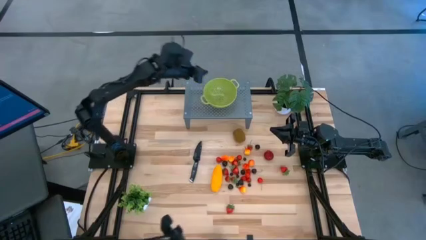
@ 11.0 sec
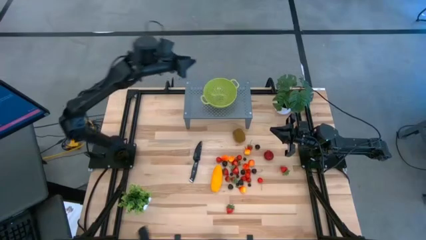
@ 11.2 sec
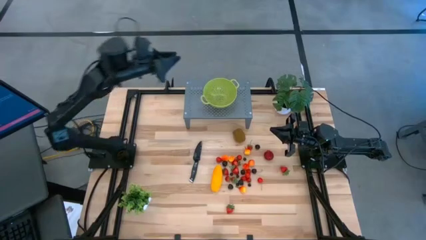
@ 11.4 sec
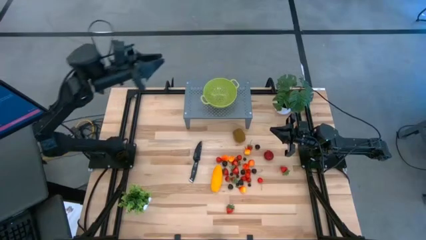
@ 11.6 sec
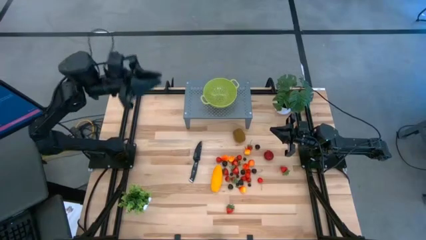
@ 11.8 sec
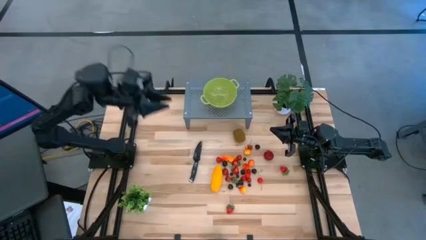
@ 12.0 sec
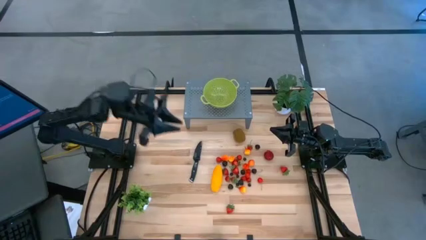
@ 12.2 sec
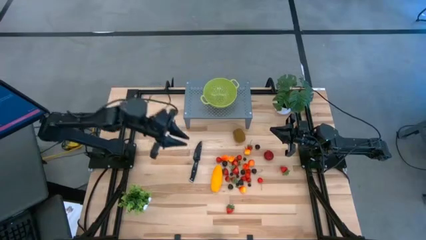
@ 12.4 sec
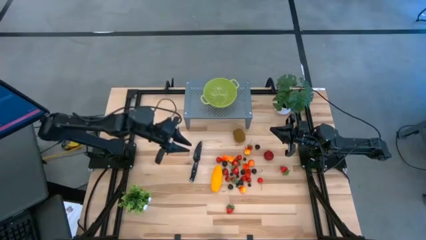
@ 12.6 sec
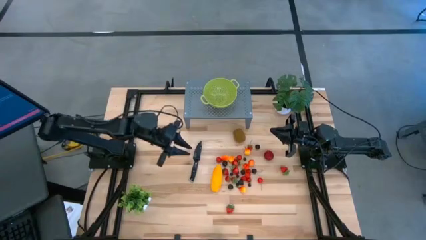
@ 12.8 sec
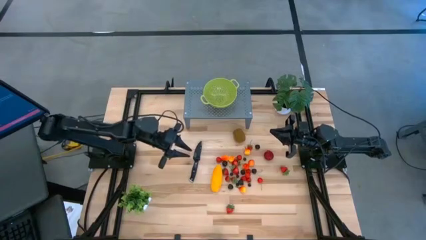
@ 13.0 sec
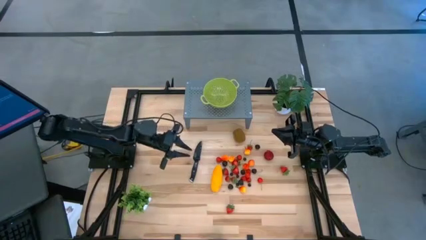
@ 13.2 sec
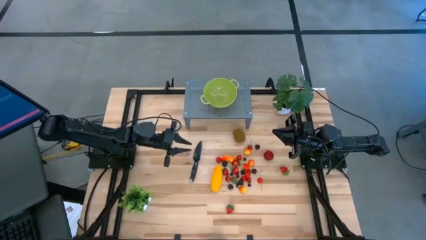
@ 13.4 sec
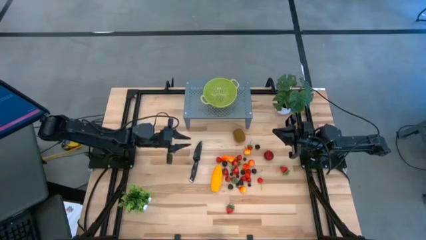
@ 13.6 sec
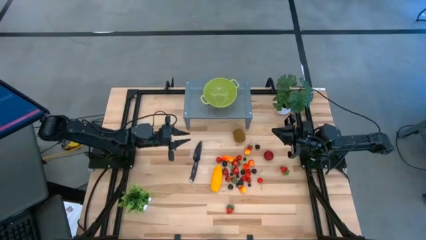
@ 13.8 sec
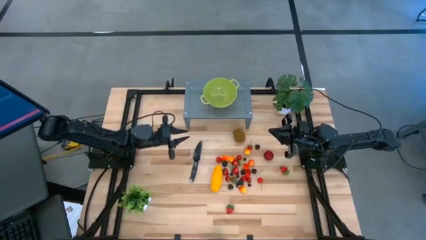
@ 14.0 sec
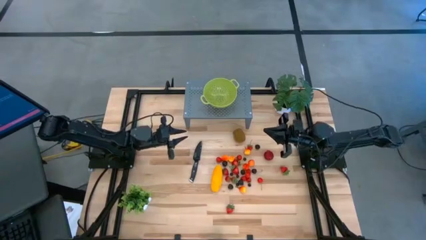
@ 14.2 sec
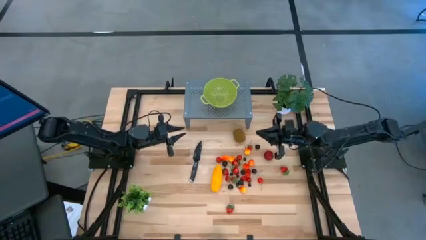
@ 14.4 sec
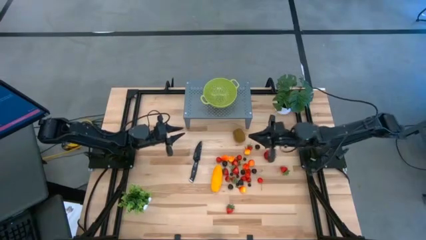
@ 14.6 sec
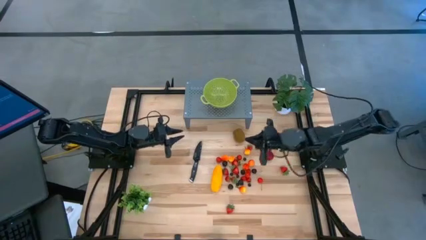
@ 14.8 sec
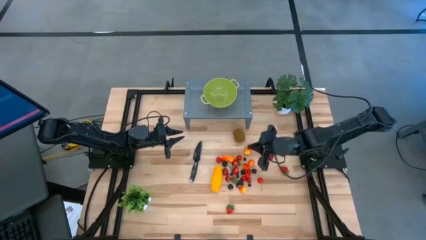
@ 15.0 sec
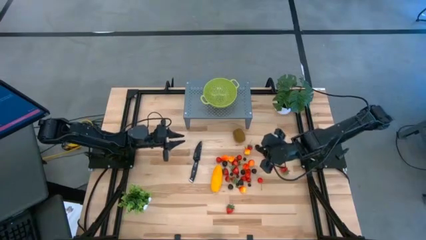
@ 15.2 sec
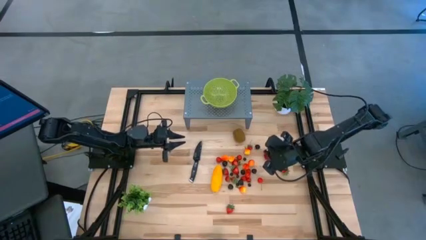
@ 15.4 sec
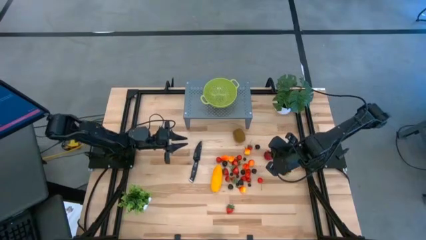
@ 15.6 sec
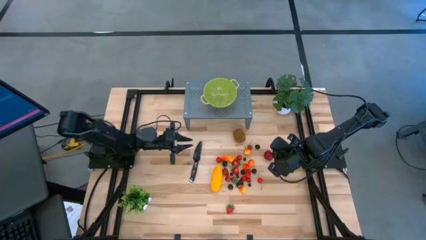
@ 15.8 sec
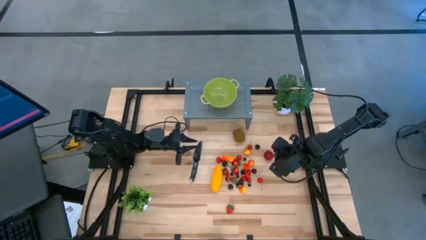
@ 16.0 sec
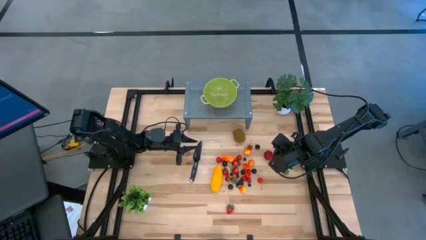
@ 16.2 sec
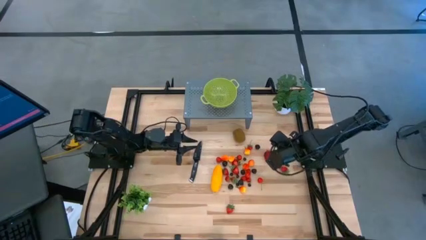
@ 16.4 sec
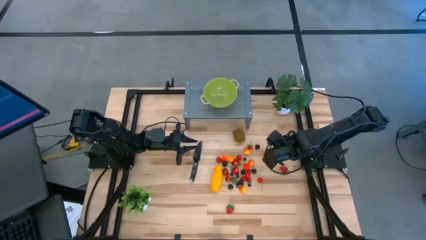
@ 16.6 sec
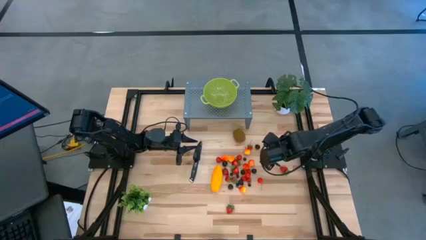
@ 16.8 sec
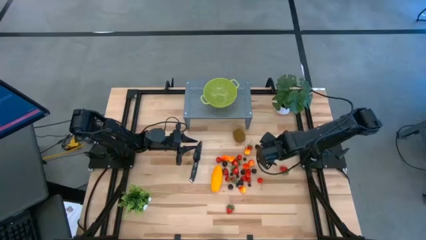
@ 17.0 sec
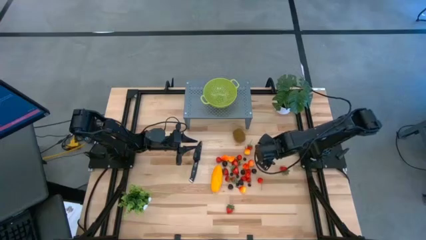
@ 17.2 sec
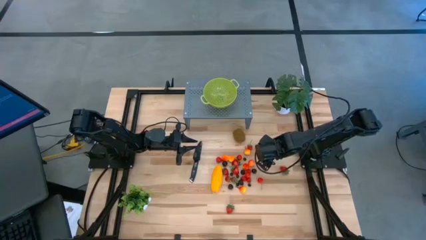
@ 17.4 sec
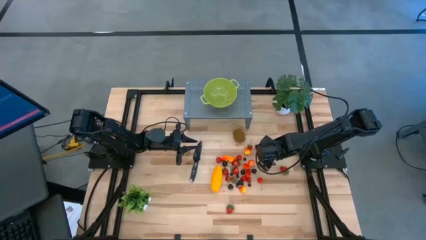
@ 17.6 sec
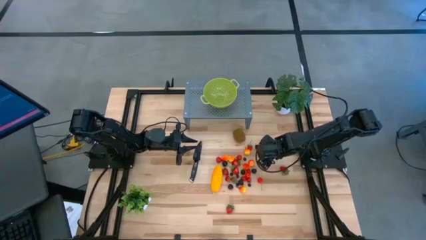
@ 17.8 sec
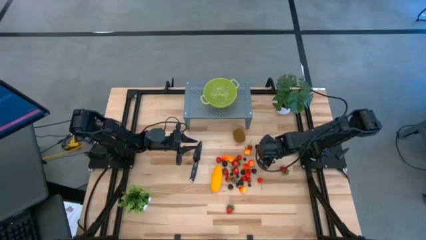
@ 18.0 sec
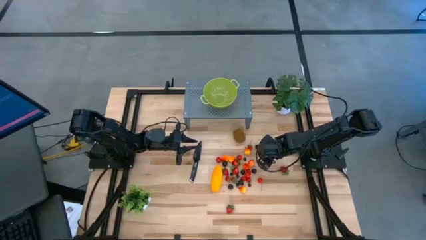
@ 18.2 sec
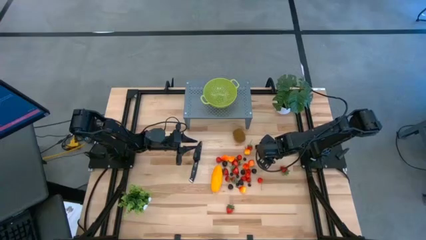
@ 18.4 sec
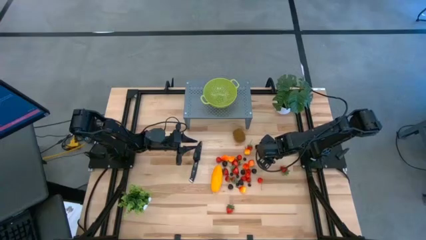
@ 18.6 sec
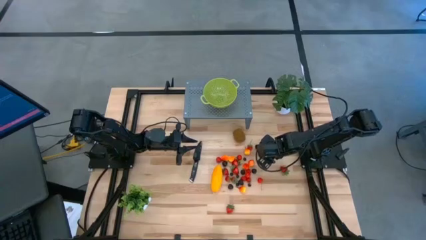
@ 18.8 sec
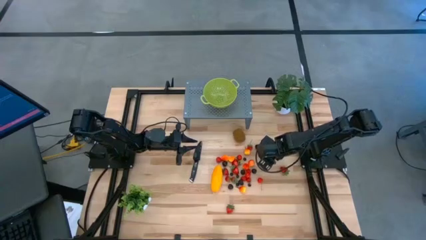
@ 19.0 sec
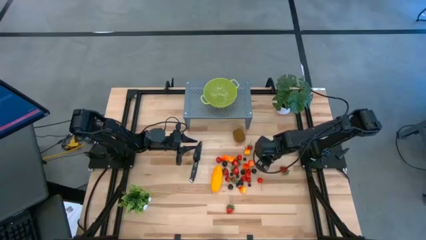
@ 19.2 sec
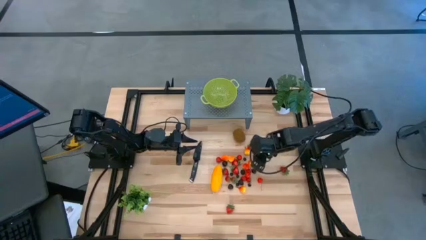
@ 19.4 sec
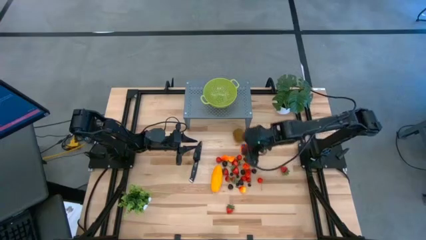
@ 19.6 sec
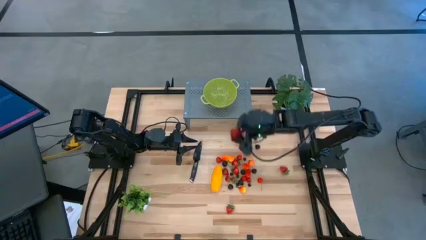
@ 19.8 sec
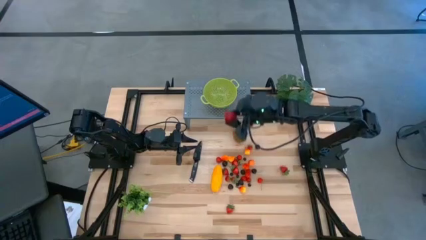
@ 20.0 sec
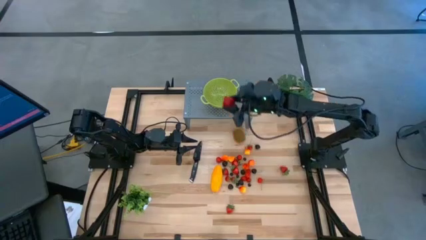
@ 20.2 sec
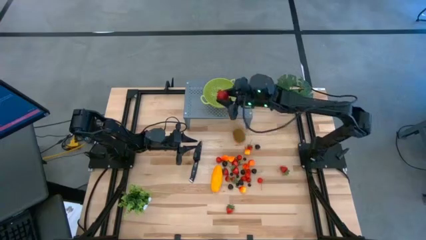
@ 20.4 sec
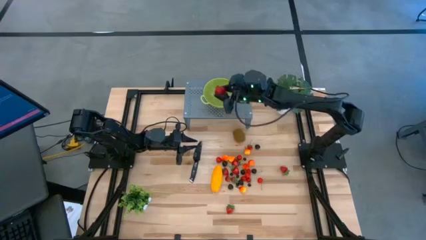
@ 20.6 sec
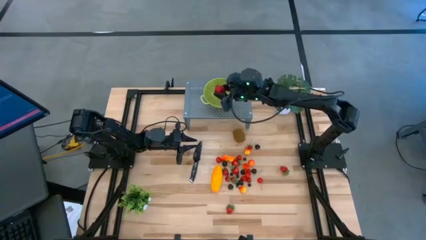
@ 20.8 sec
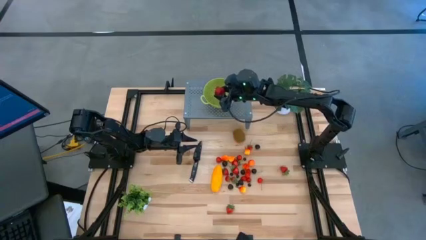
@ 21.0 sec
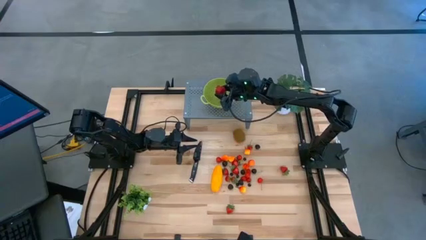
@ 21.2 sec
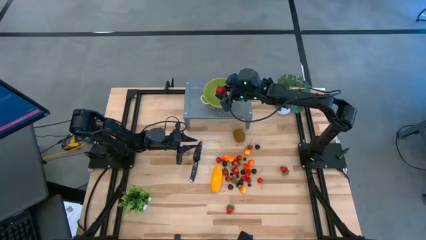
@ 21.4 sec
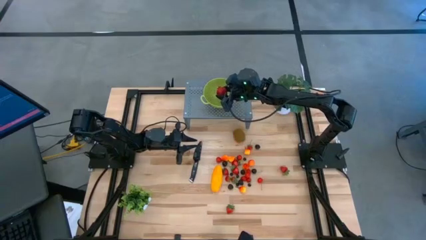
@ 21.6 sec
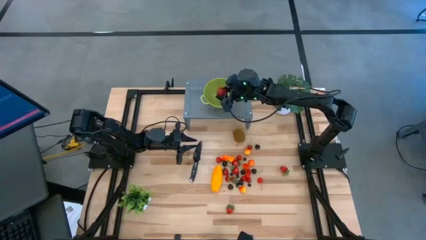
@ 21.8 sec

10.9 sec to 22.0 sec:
Task: Pick & Place Fruit
Put the pomegranate into the green strainer bowl on the shelf

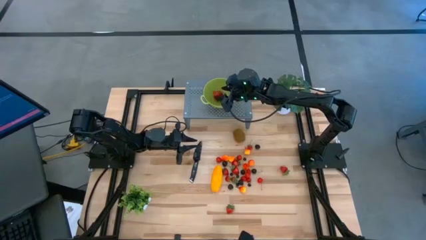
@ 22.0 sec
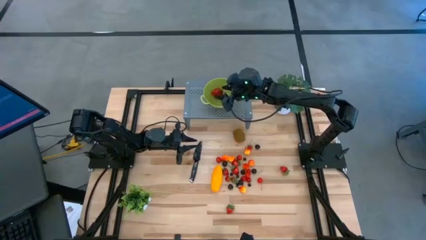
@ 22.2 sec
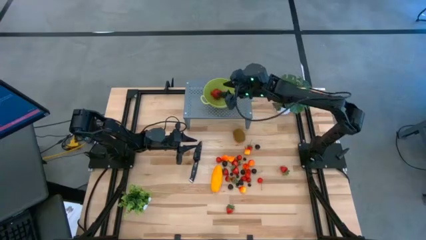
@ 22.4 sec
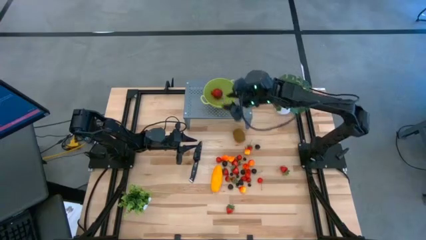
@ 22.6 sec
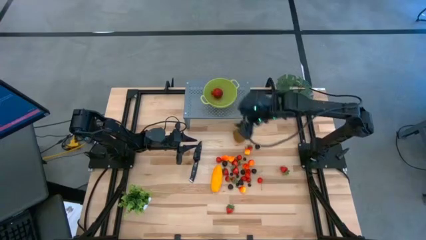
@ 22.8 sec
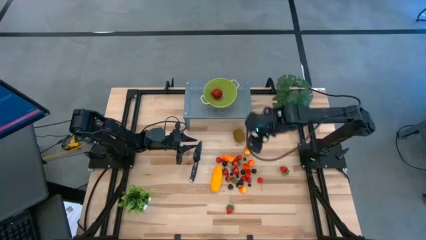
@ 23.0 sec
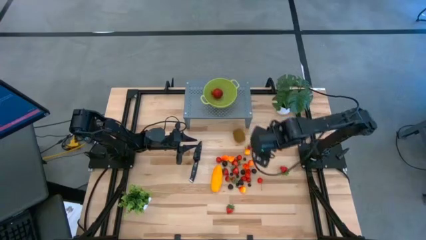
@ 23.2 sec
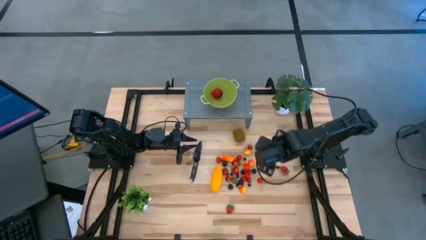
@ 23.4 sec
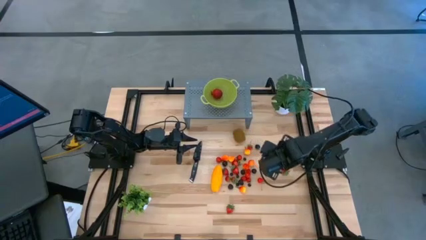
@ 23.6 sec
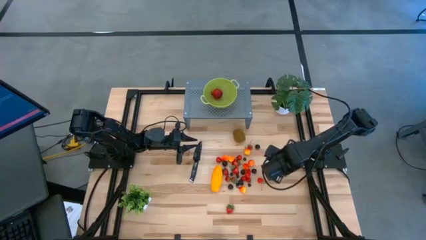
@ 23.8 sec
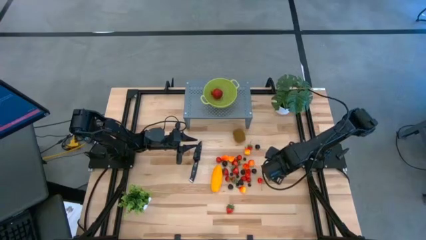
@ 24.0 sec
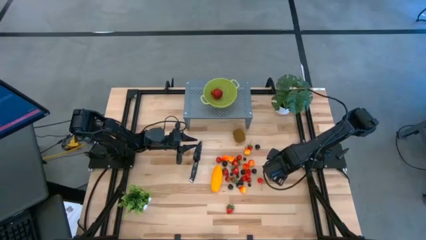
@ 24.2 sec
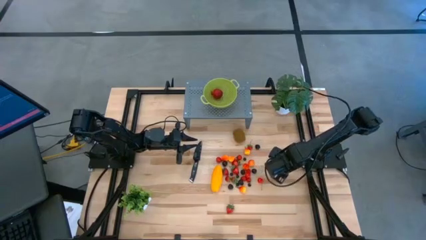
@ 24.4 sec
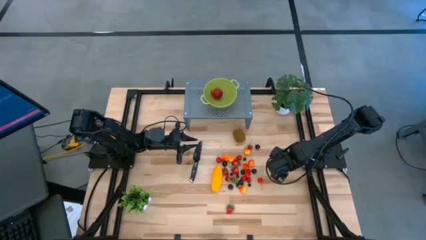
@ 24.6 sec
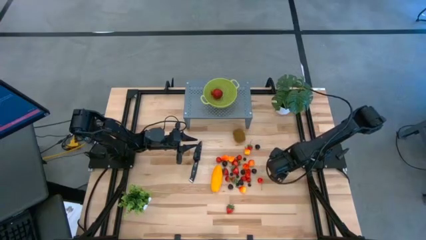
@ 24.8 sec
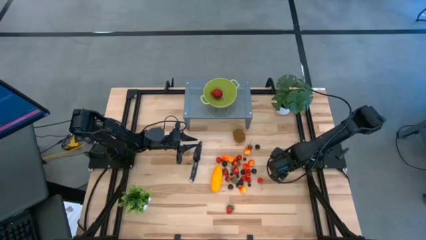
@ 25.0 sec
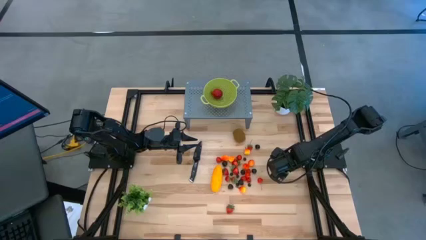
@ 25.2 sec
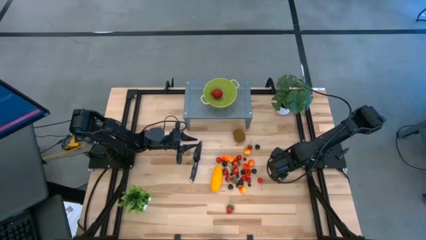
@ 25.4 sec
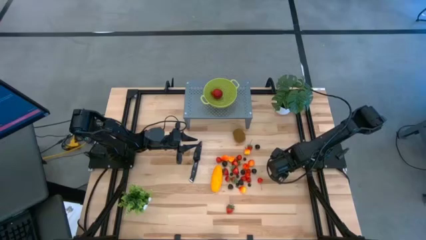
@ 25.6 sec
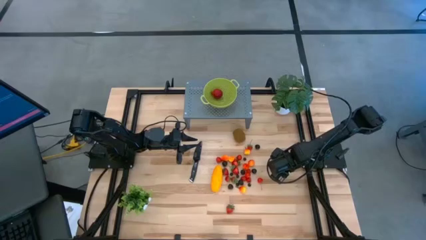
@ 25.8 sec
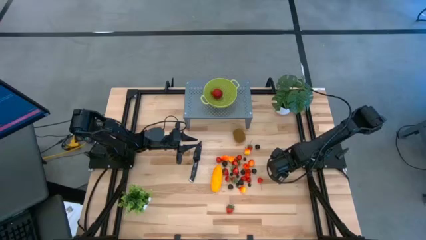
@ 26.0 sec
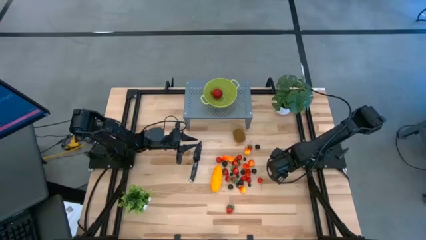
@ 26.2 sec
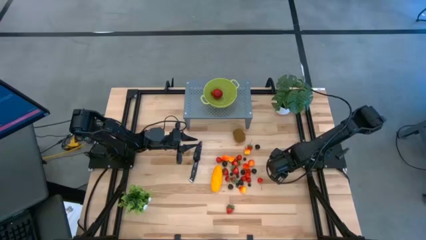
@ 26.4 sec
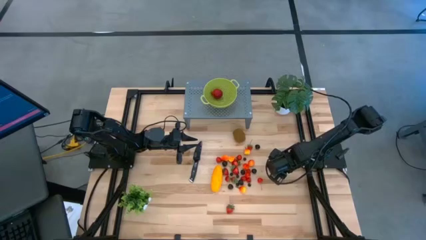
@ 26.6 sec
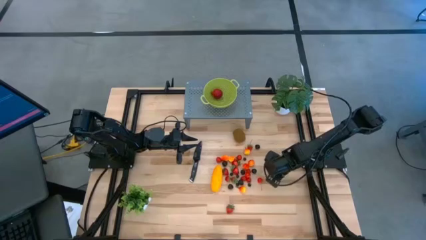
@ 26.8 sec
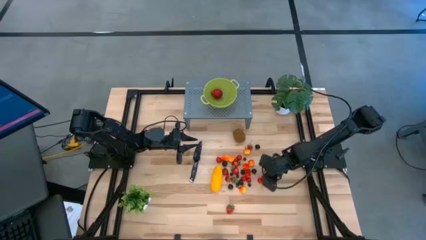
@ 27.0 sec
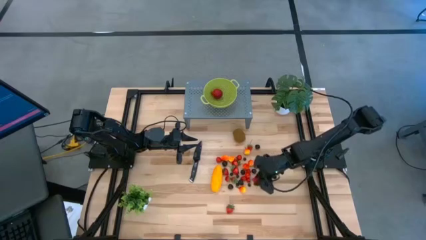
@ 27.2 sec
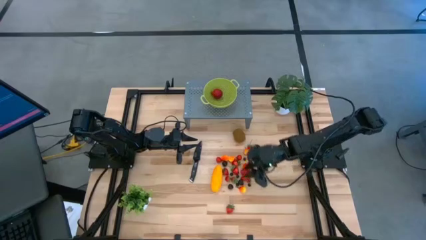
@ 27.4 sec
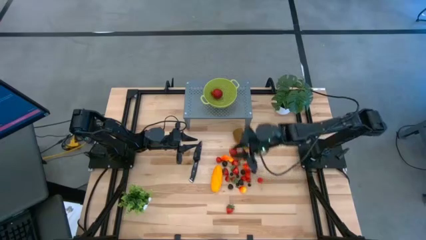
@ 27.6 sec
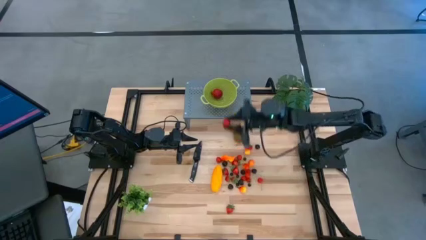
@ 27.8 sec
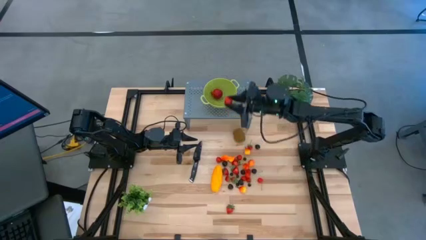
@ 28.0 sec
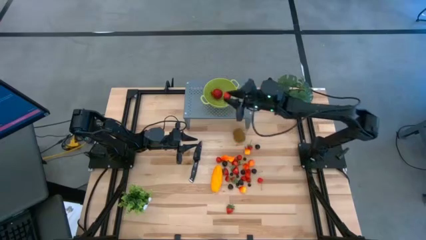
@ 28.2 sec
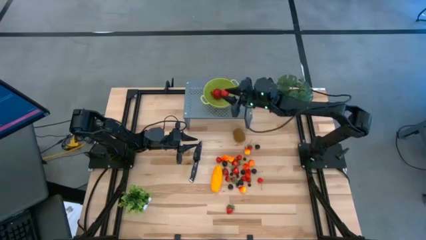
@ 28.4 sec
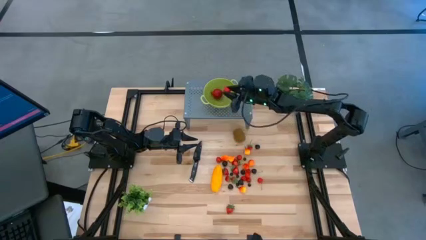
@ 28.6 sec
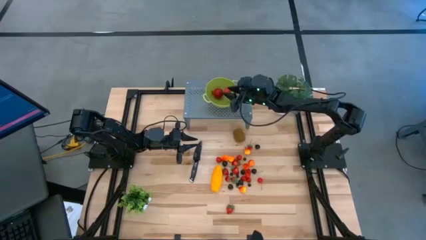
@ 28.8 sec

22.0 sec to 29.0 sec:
Put the strawberry into the green strainer bowl on the shelf
